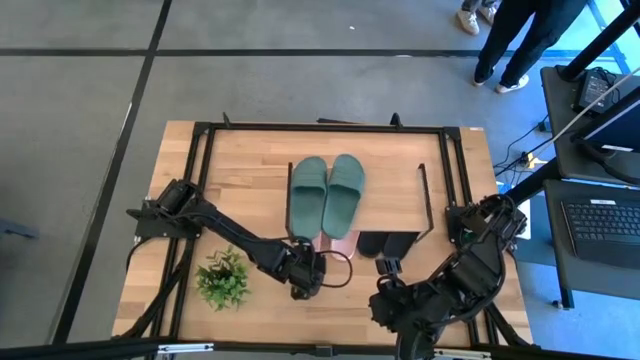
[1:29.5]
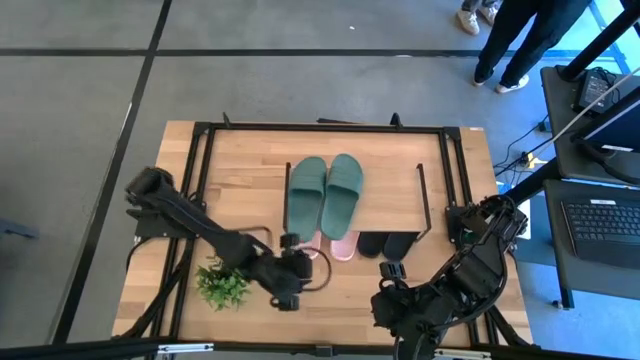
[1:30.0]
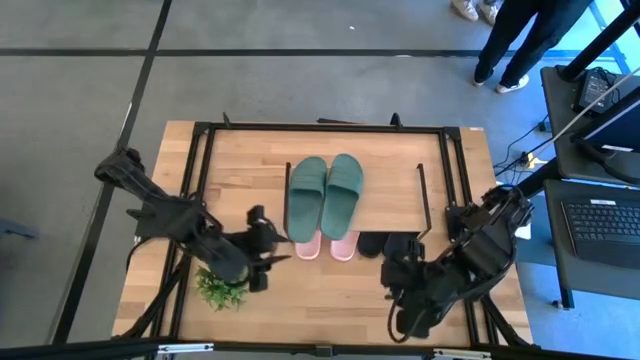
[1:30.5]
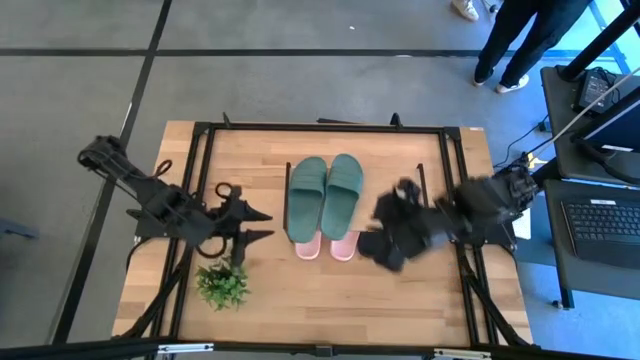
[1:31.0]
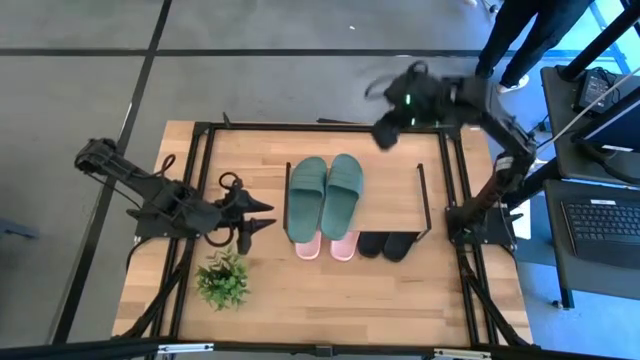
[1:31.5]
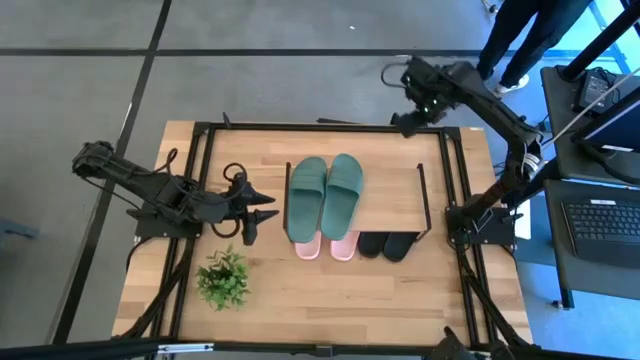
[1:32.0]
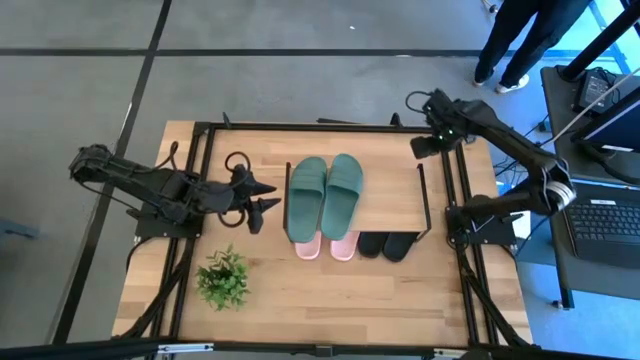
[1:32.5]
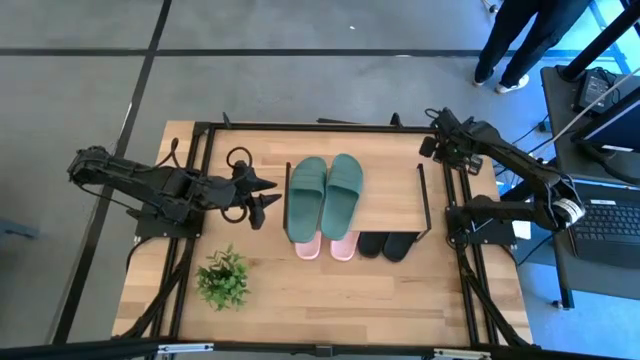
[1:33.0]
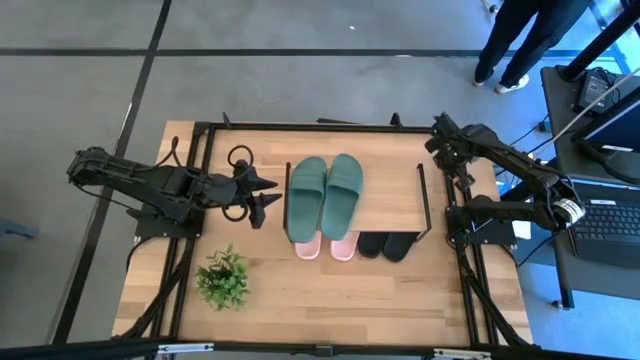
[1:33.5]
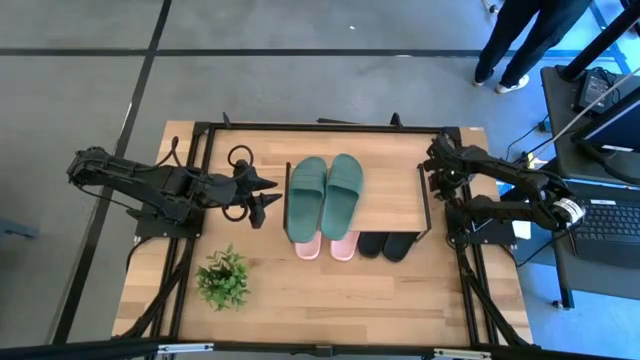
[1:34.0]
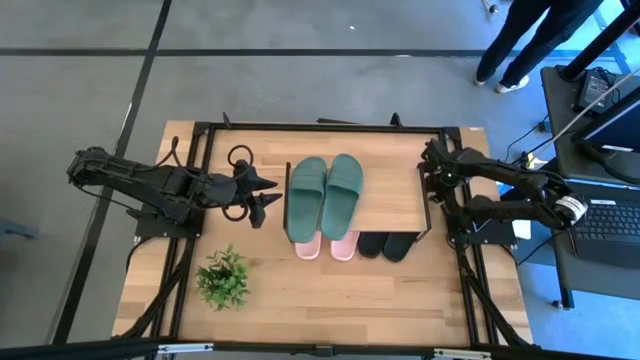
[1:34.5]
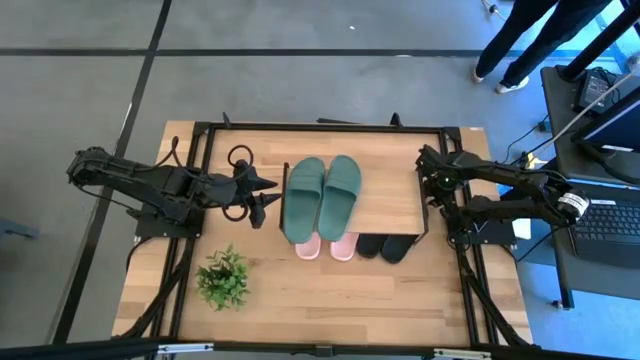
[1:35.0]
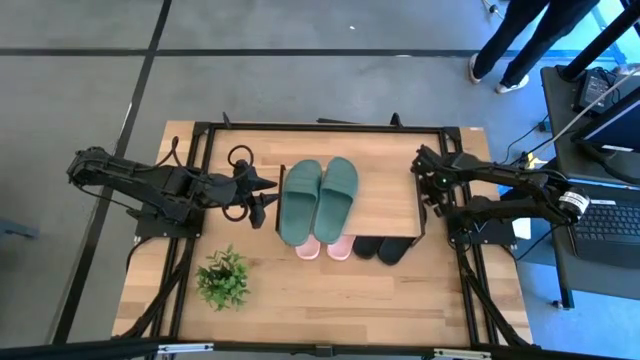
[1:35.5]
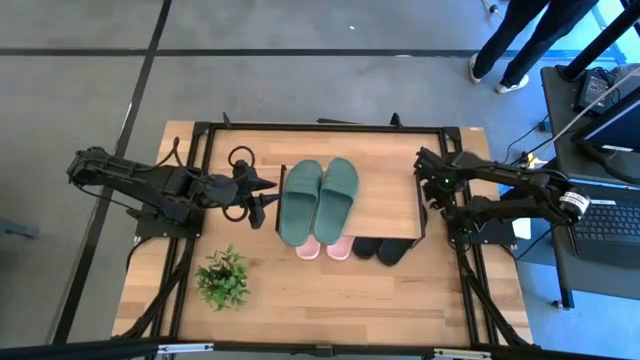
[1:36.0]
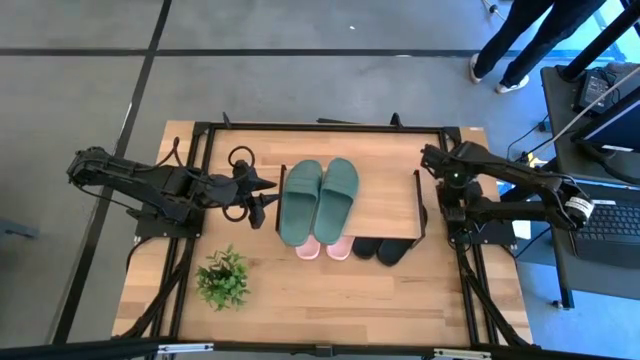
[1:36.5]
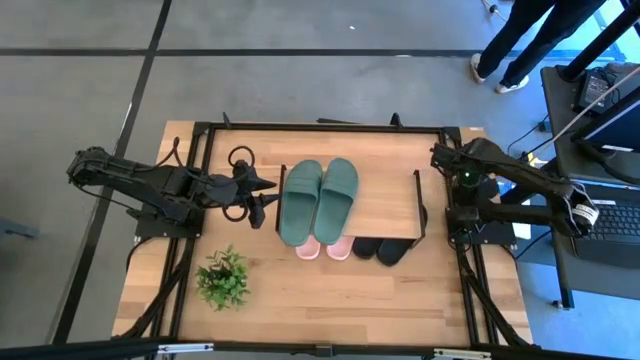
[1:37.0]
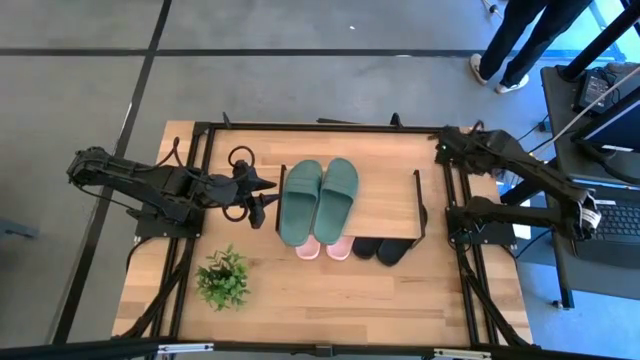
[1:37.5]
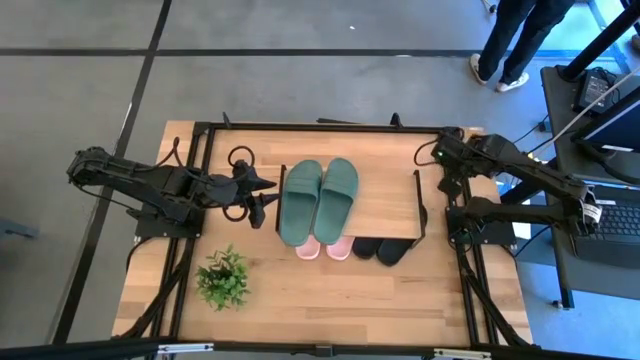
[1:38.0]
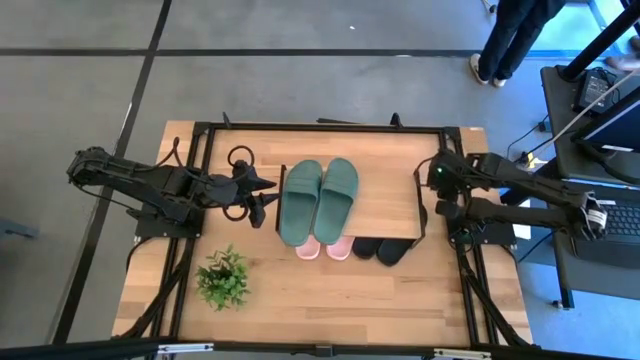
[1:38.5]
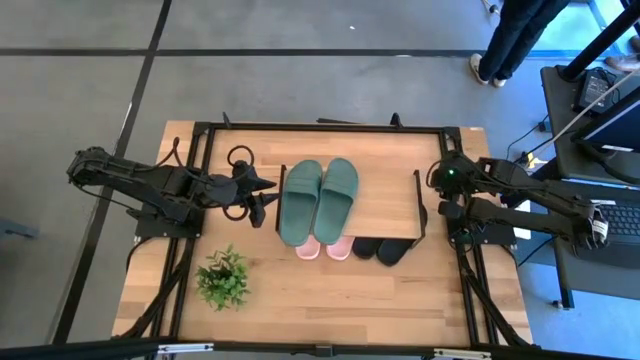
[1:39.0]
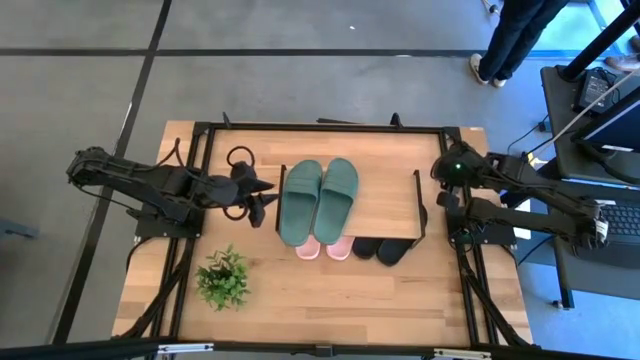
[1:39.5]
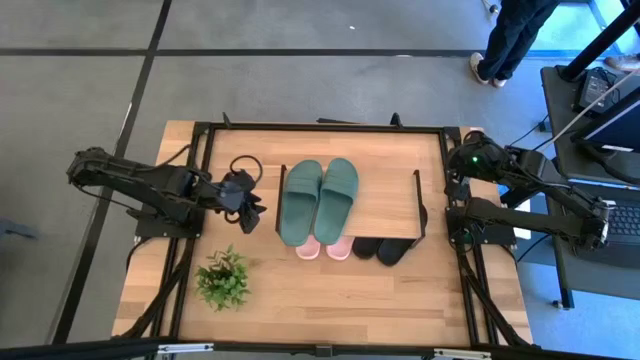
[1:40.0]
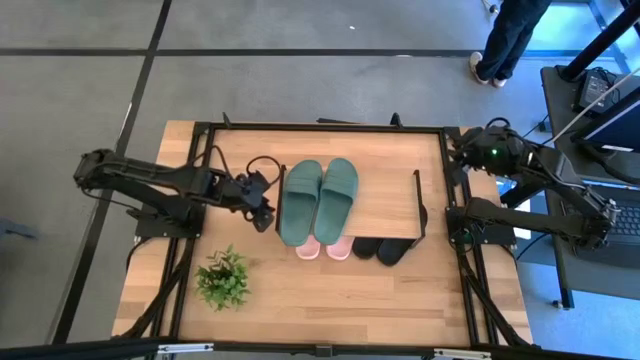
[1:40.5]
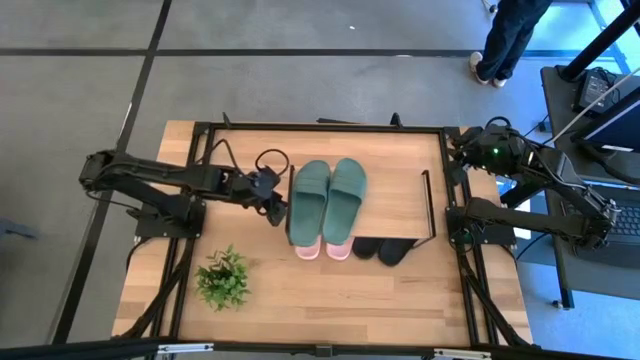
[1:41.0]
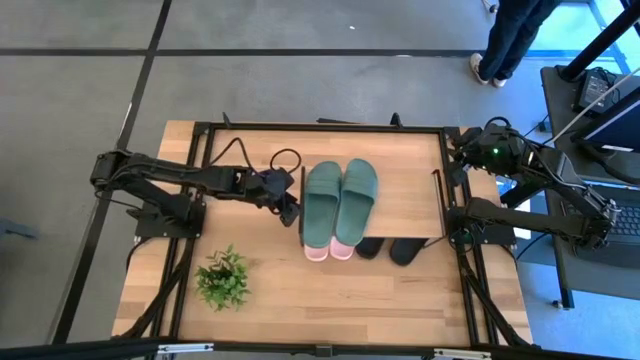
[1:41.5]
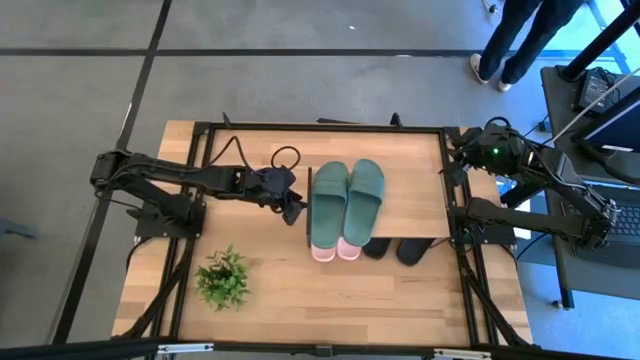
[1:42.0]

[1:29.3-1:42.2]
Task: Pick and place slides into the shelf
Move the shelf to the right side of the table

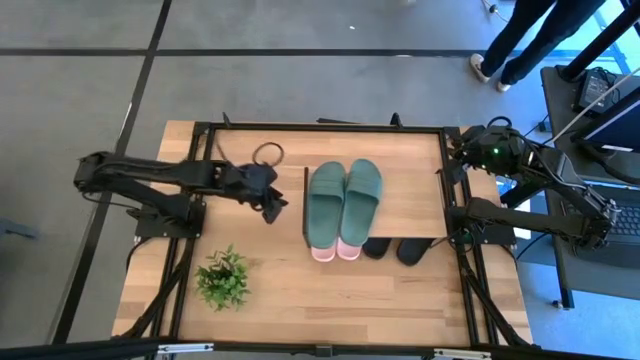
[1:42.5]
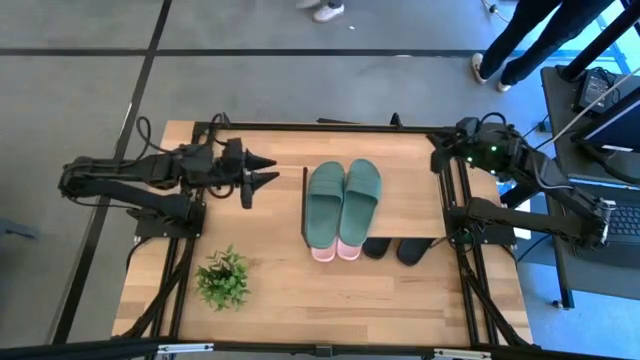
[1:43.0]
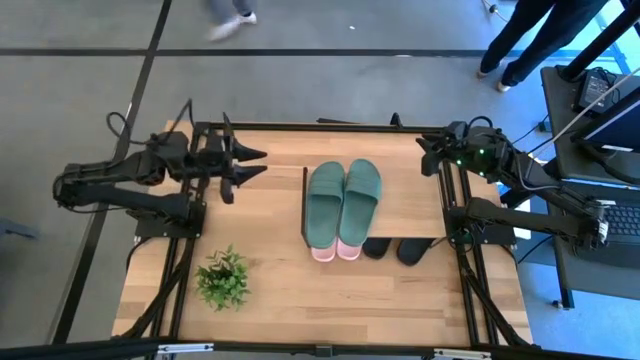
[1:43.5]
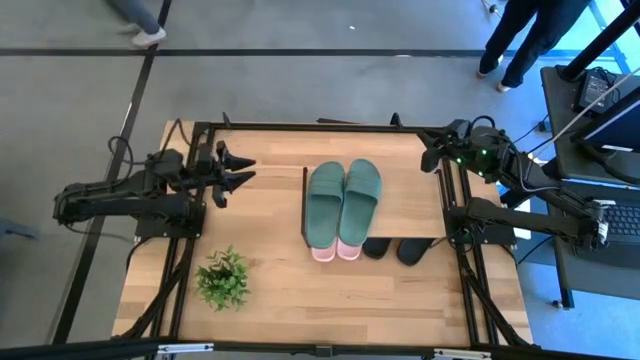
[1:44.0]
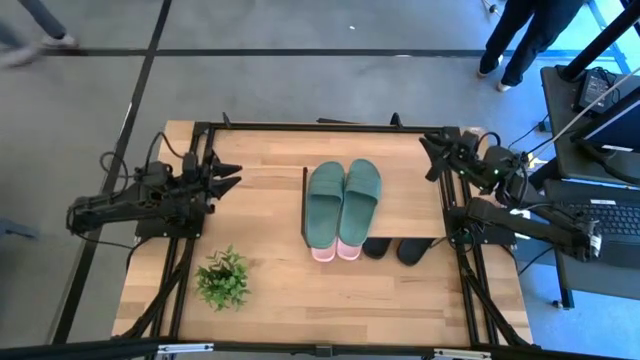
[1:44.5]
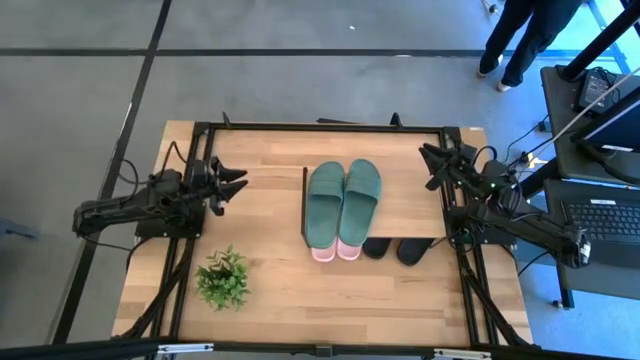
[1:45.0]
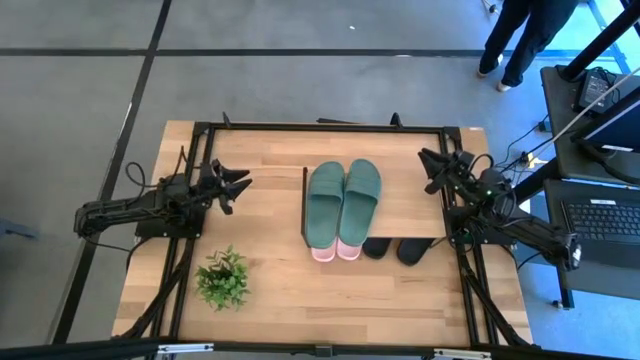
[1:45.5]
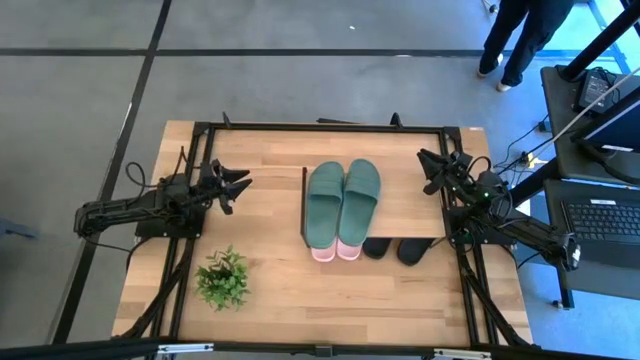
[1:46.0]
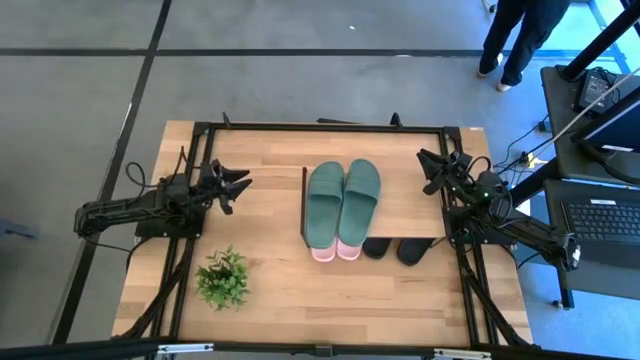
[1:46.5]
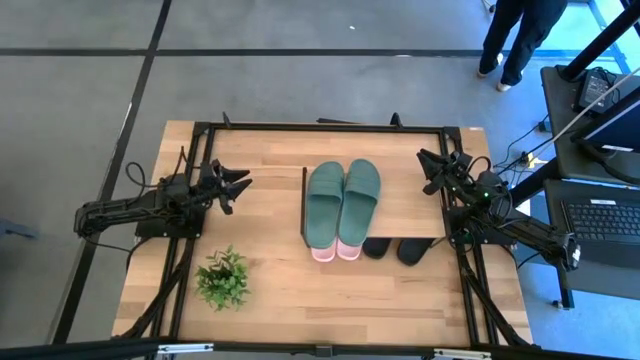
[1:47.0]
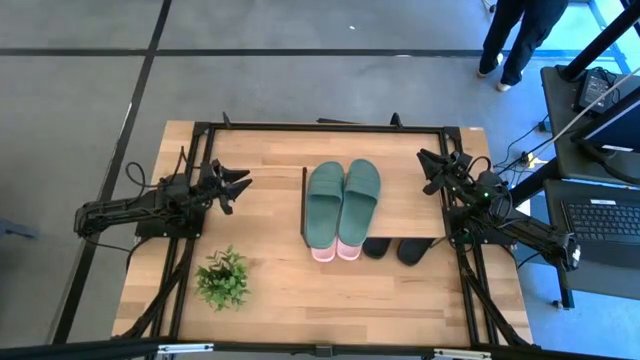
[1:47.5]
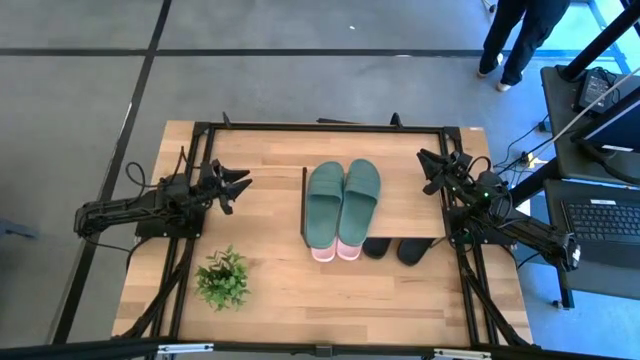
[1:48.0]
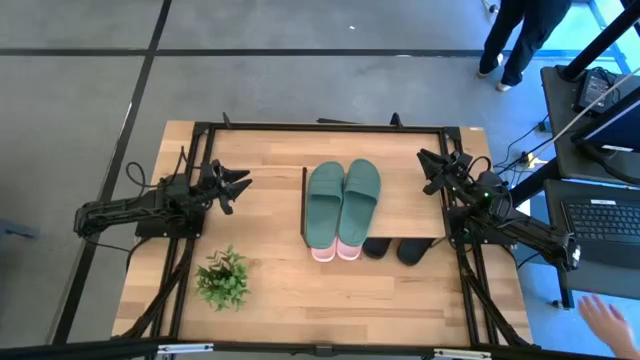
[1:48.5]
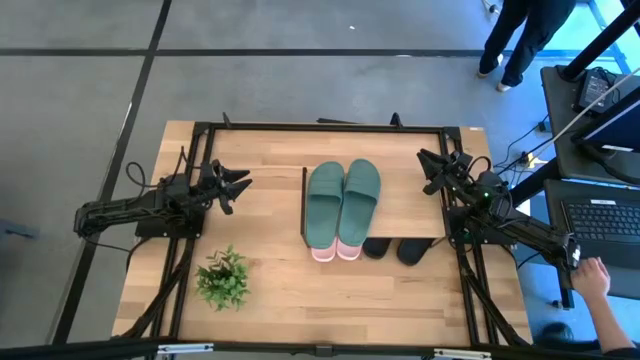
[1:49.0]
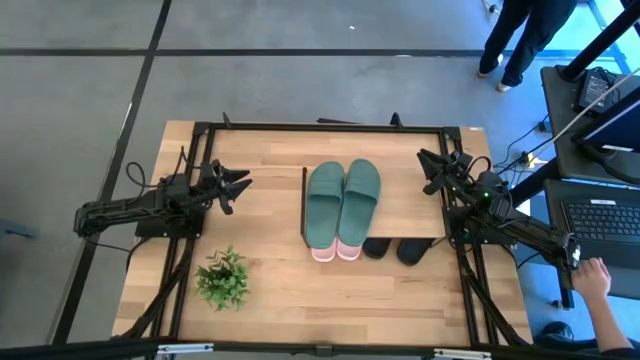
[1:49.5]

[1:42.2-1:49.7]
Return to Home Position

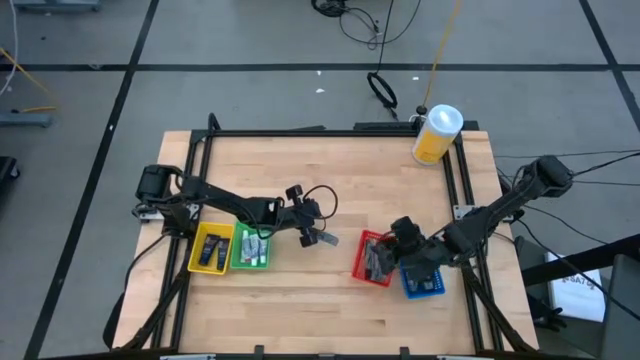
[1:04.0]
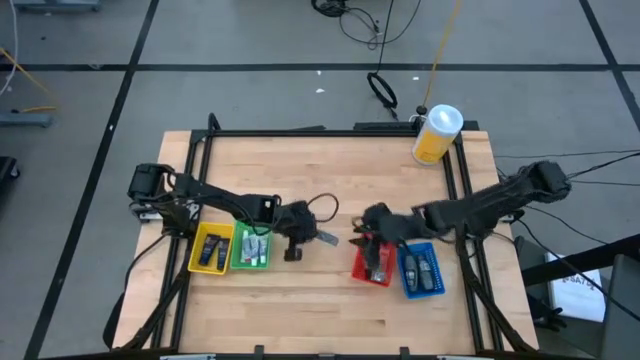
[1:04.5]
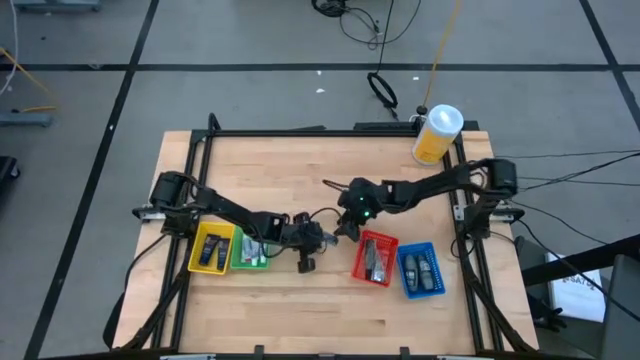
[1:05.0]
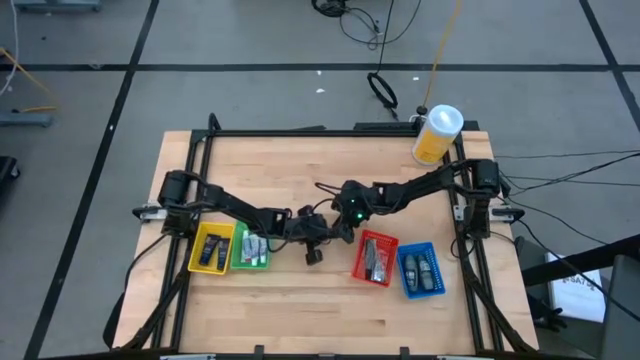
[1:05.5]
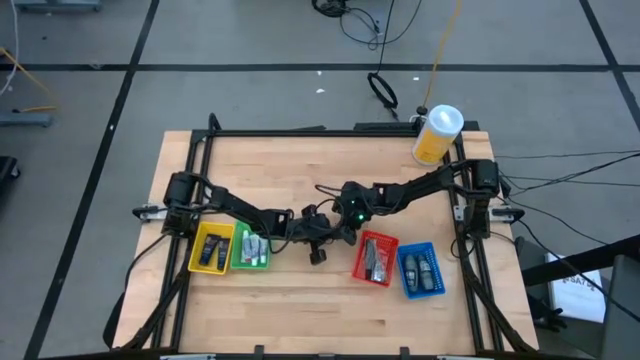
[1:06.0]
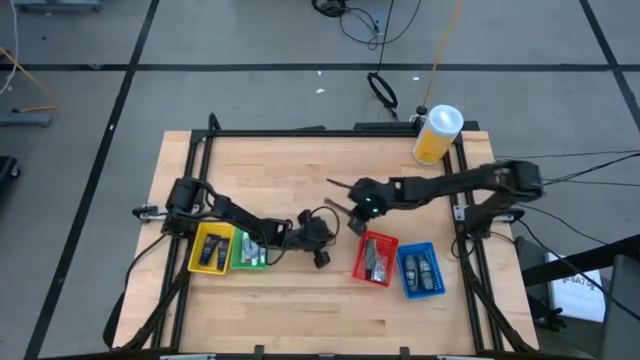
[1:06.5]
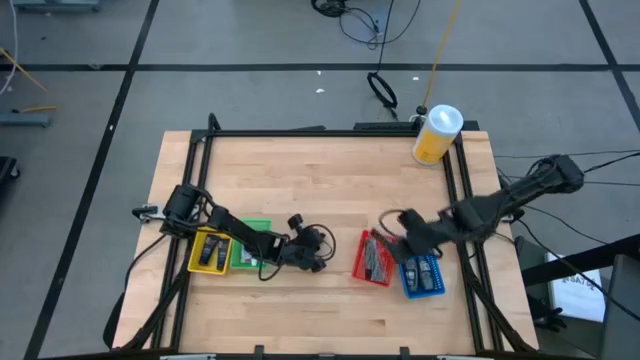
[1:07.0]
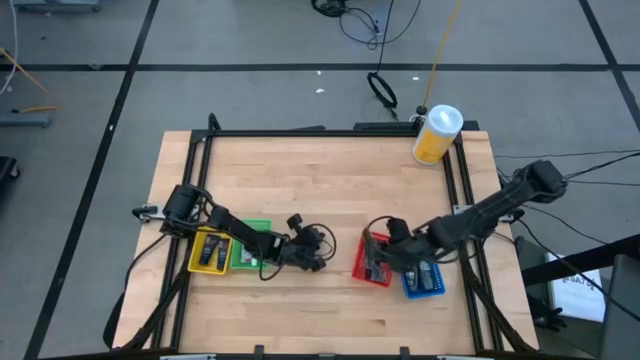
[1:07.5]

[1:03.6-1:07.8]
Task: Pick & Place Travel size toiletries
Put the black comb into the red bin
